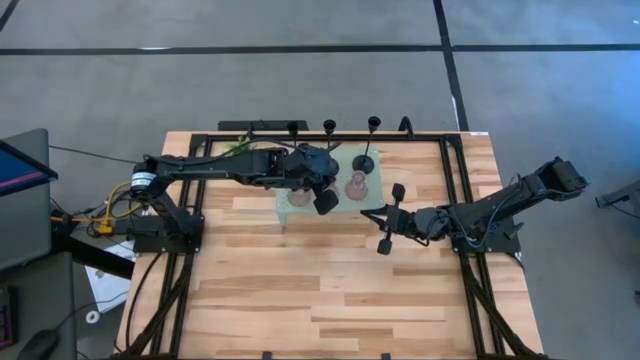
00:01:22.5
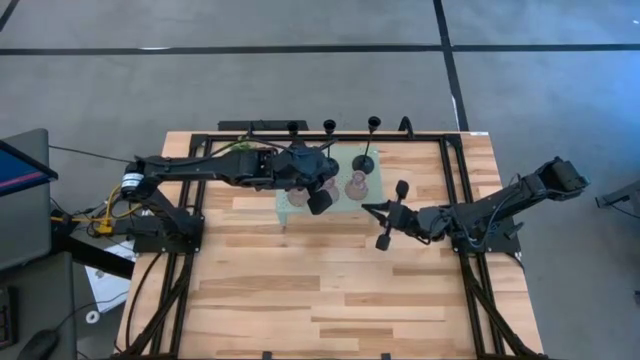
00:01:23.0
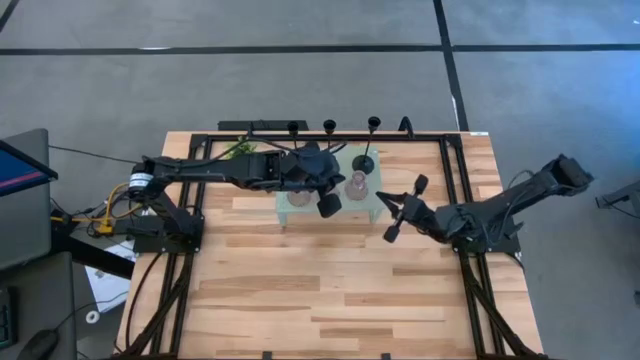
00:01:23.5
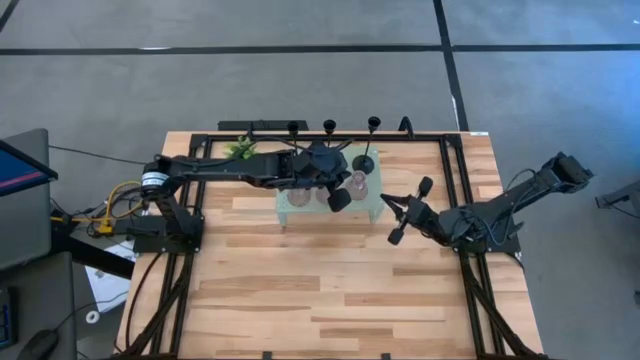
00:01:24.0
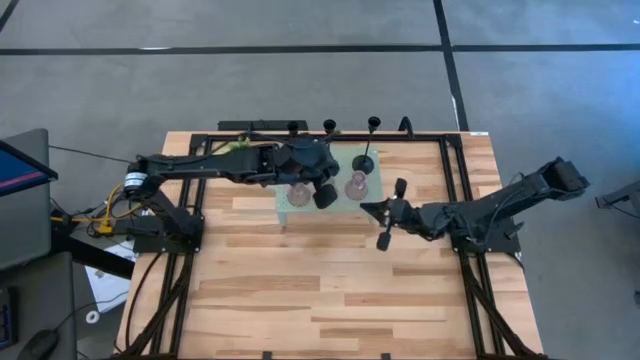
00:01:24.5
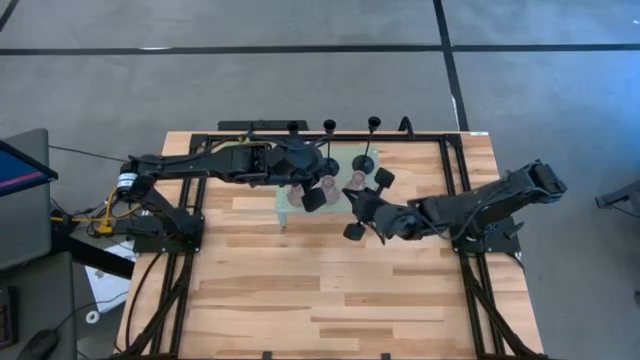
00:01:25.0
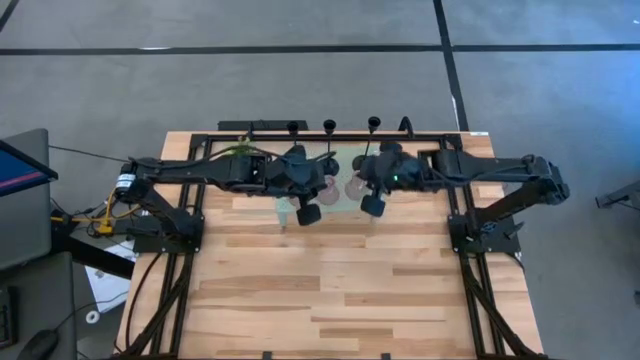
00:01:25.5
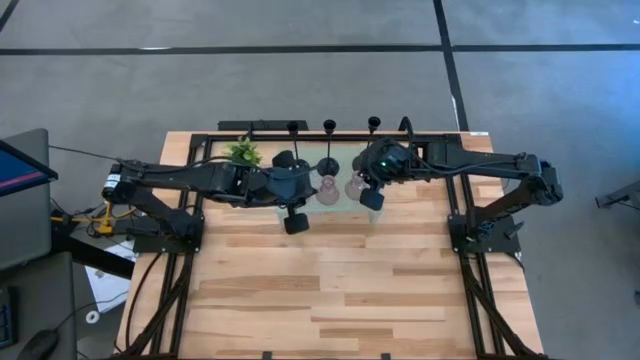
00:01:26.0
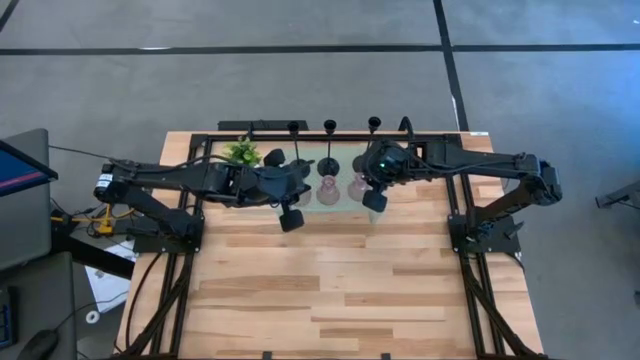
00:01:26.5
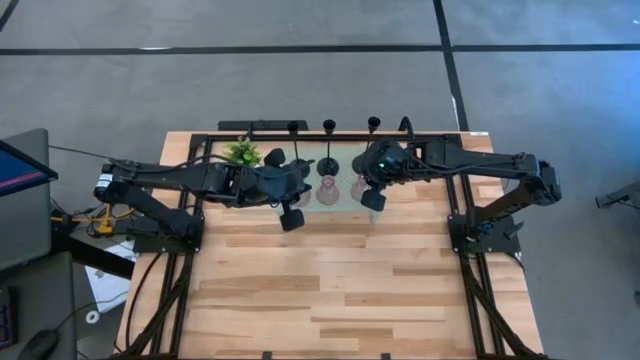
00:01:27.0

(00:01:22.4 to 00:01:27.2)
Task: Pick & Place candle stick holders
Adjust the right pink glass candle holder on the shelf

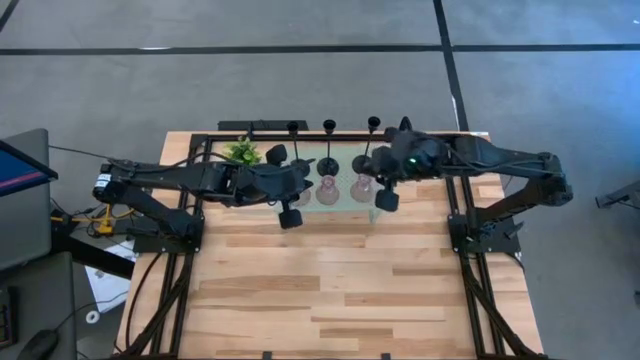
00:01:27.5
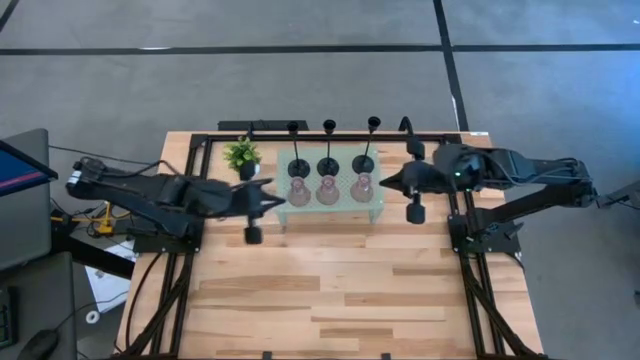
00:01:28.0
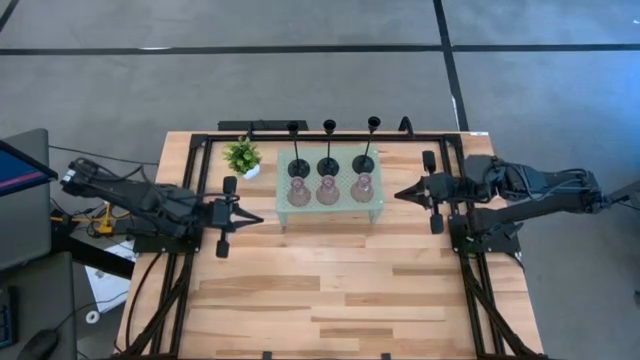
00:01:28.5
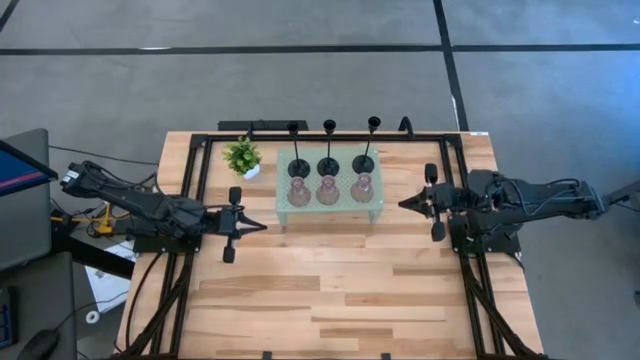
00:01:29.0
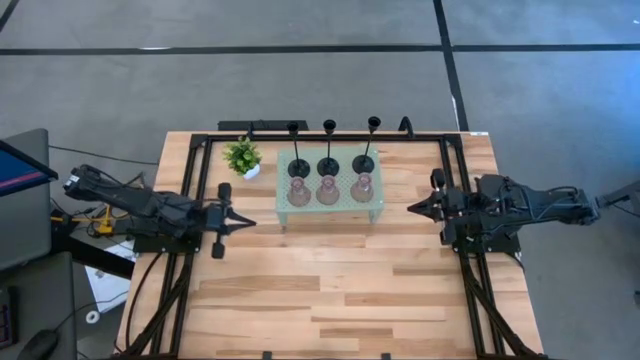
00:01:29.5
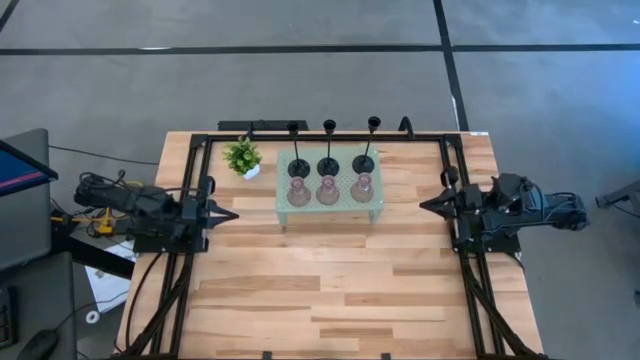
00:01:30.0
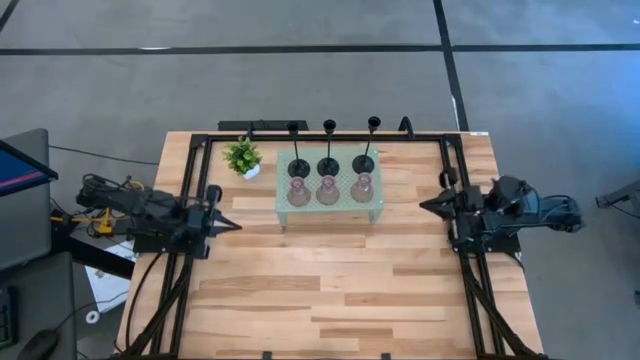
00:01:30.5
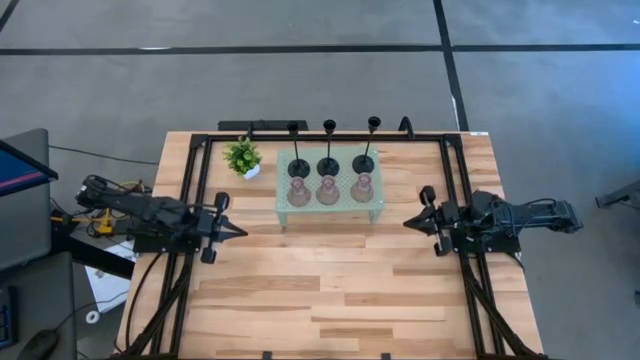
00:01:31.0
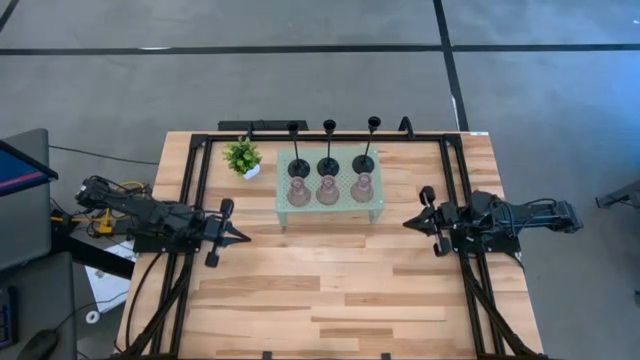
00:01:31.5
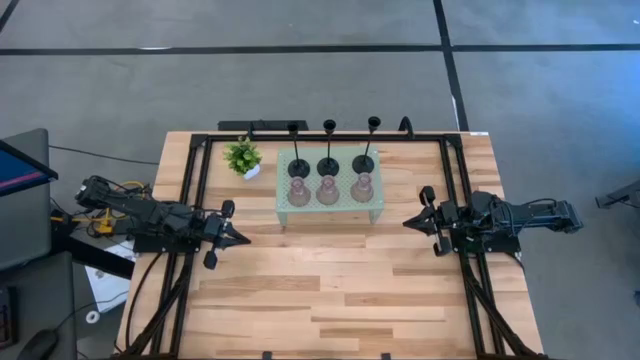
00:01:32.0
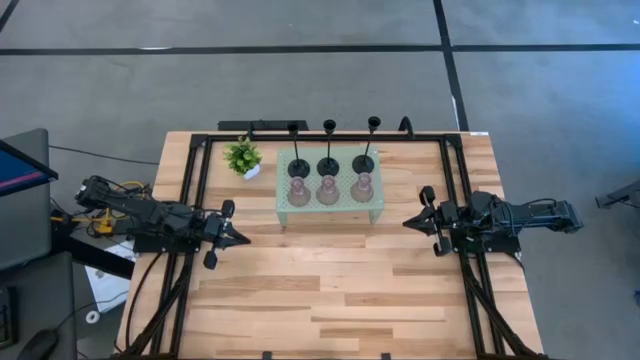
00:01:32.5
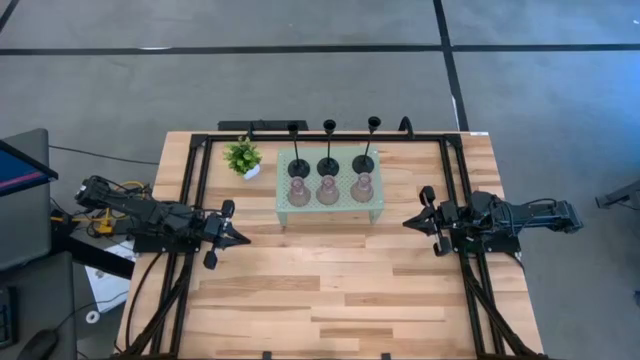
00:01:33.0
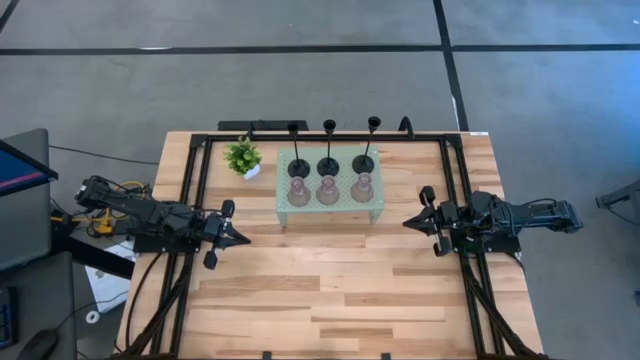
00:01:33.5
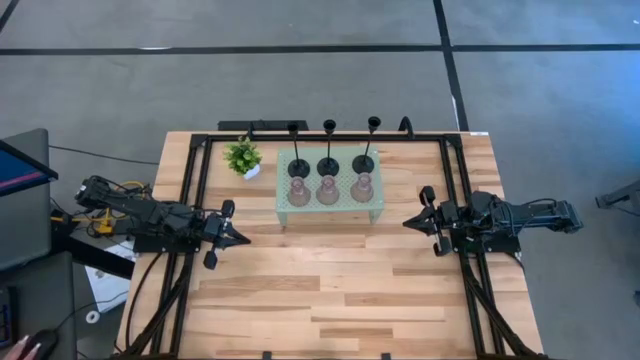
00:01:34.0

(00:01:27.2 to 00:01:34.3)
Return to Home Position

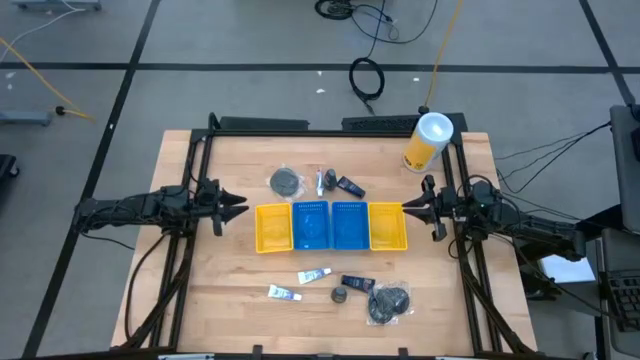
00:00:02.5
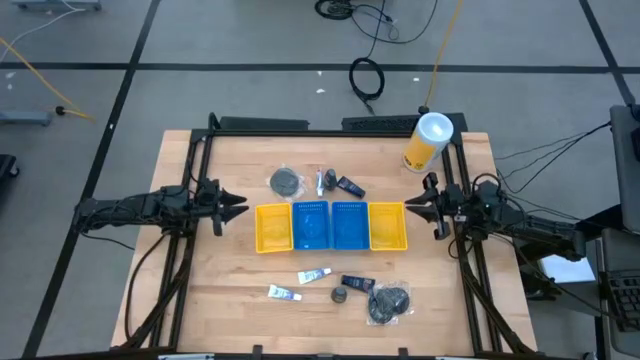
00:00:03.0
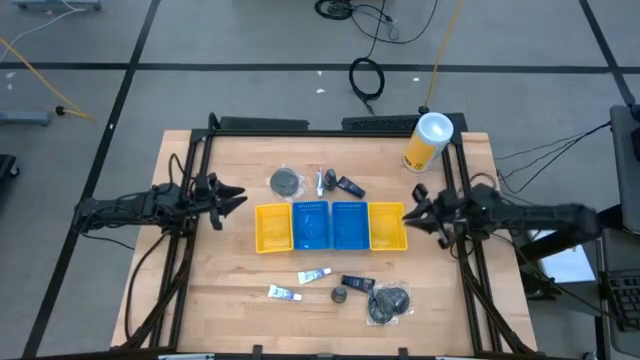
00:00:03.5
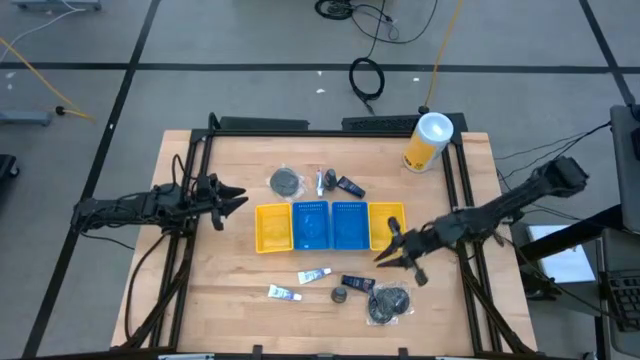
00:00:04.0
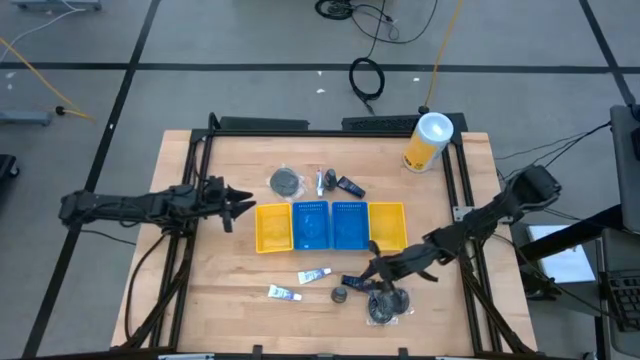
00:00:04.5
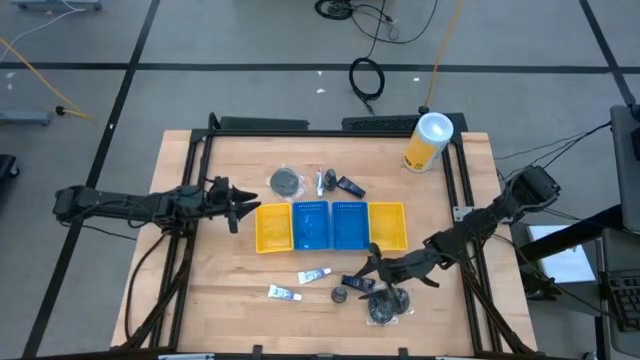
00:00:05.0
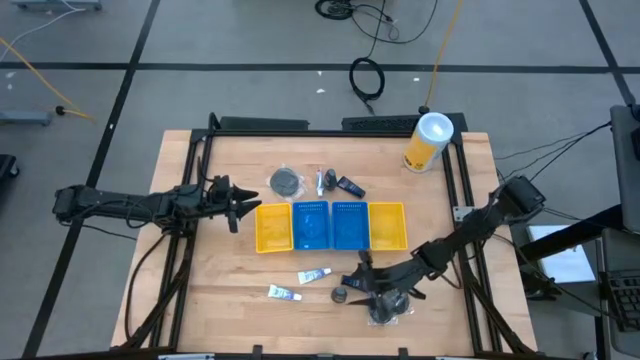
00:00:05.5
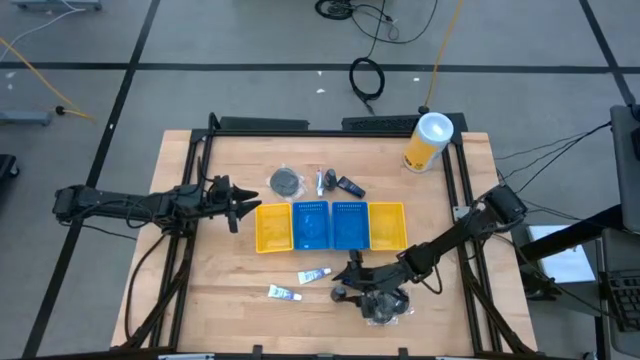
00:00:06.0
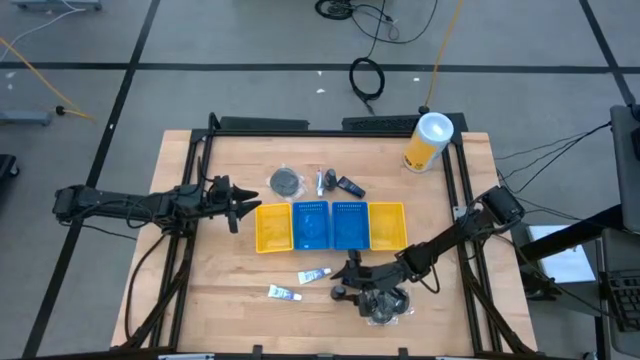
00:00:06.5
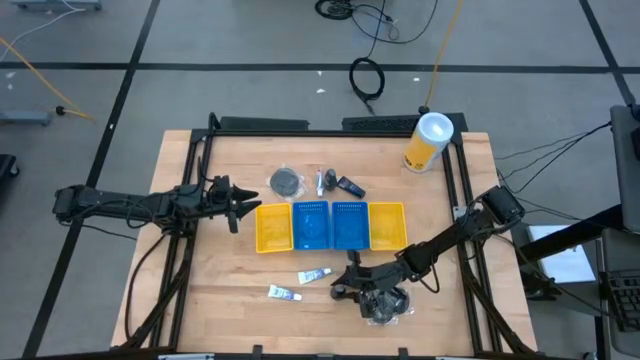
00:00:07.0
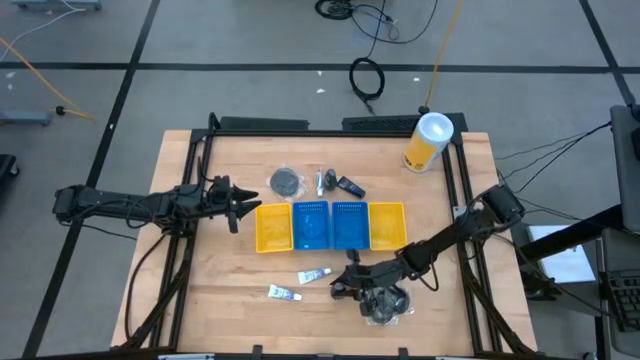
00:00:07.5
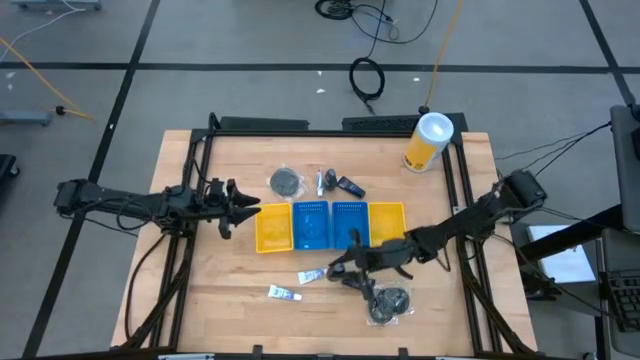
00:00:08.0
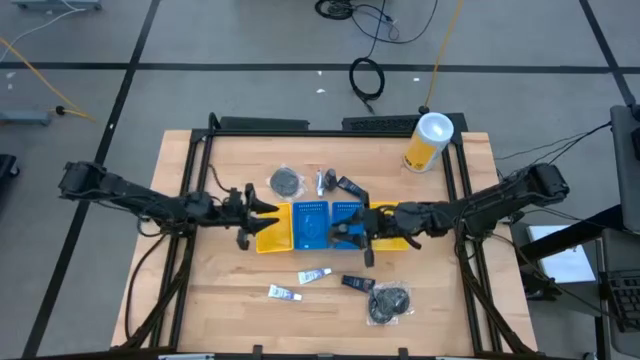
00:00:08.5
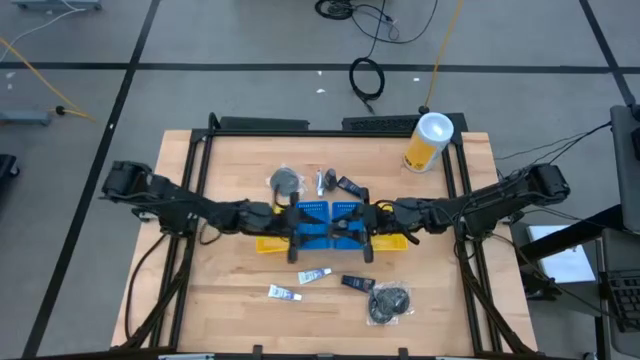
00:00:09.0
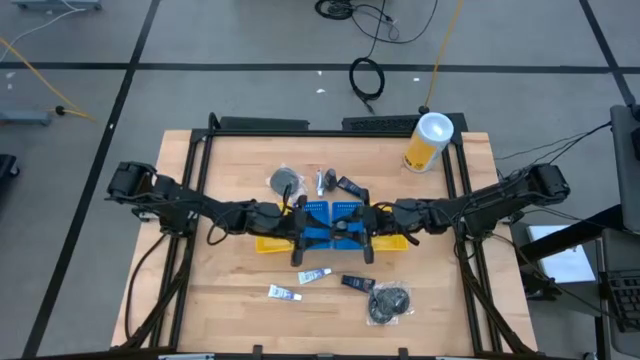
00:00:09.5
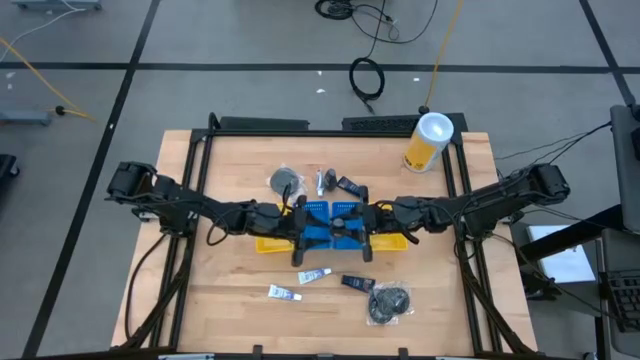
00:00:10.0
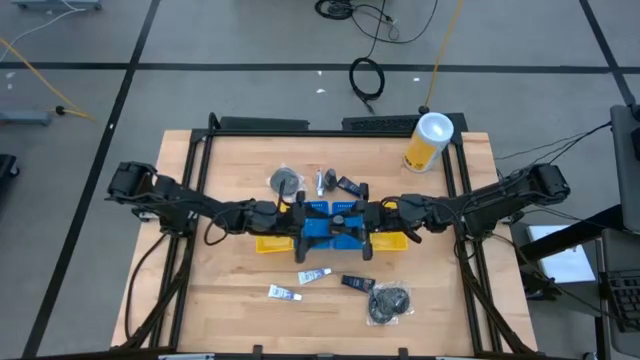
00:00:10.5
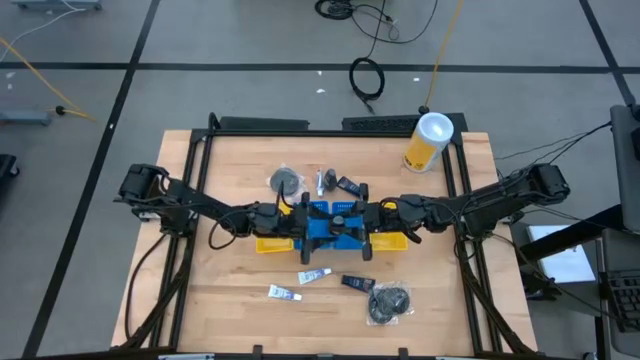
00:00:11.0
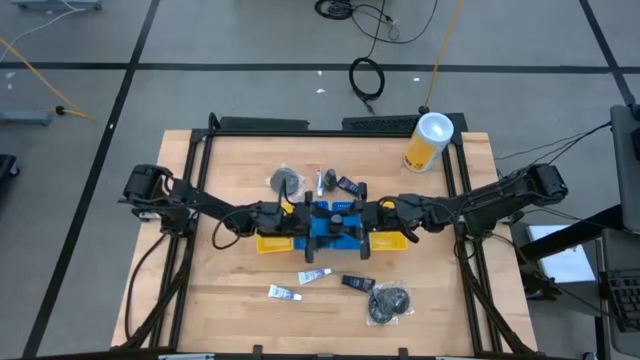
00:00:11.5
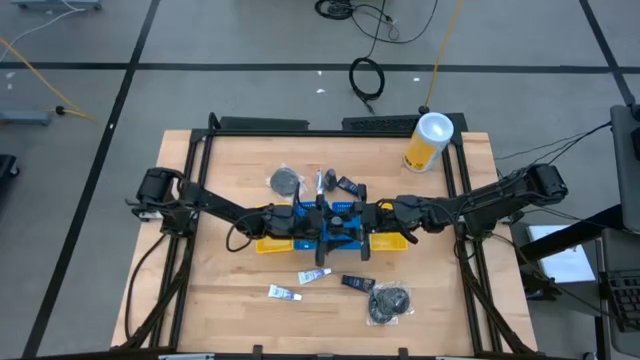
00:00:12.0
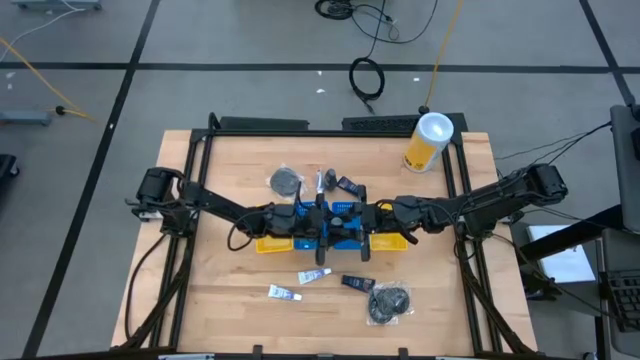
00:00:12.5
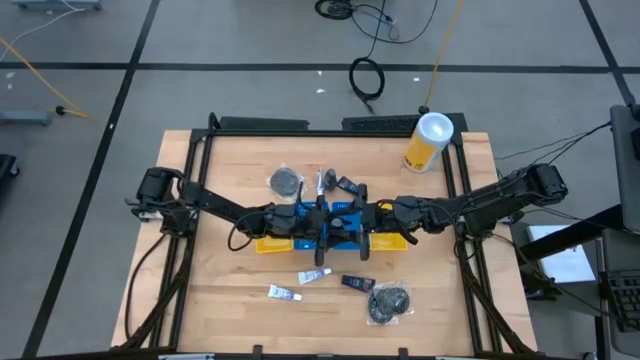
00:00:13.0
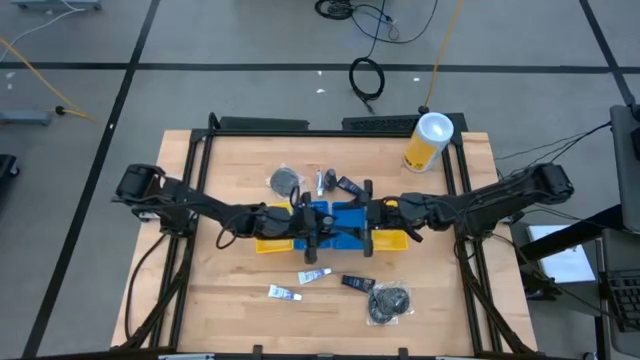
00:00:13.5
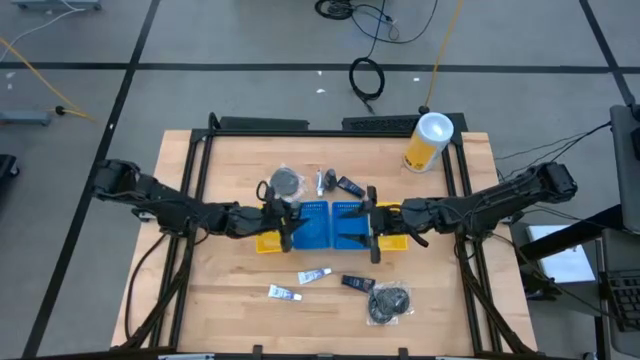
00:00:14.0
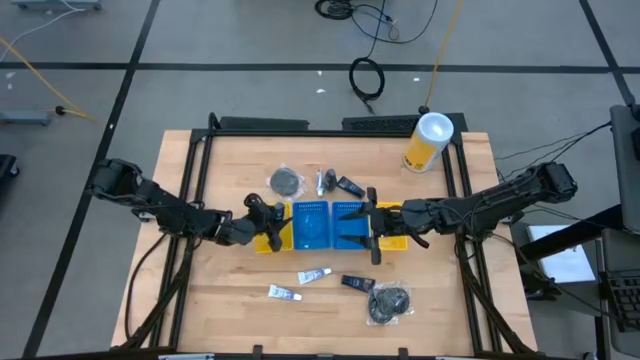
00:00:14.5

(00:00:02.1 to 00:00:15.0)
Task: Pick & Place Travel size toiletries
Put the deodorant into the left yellow bin
